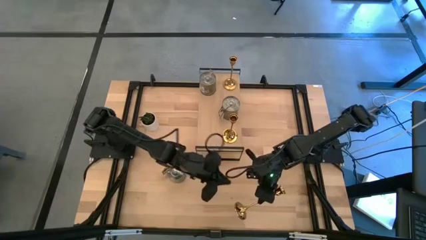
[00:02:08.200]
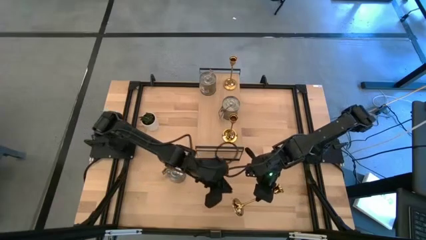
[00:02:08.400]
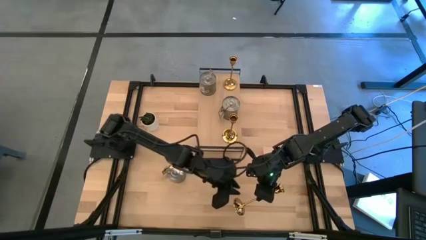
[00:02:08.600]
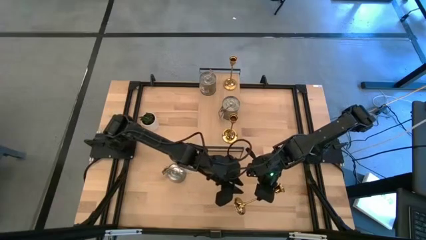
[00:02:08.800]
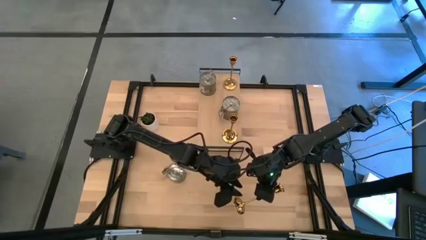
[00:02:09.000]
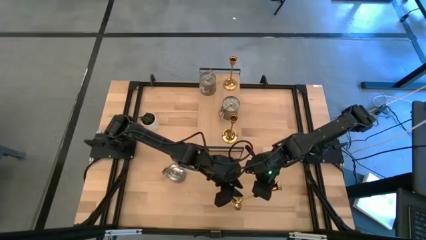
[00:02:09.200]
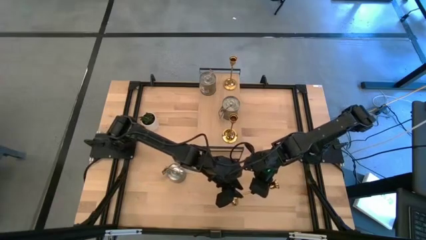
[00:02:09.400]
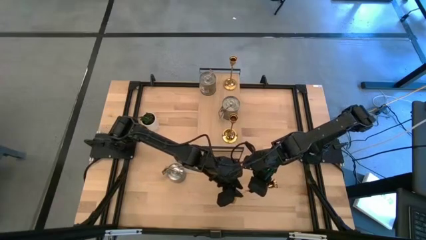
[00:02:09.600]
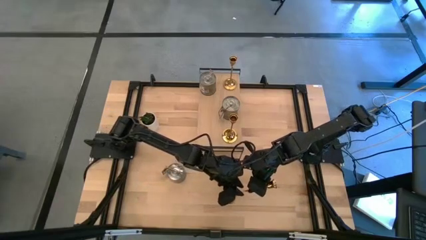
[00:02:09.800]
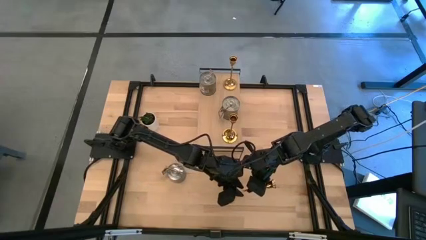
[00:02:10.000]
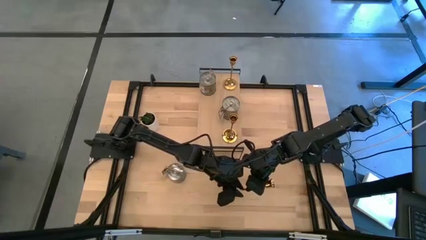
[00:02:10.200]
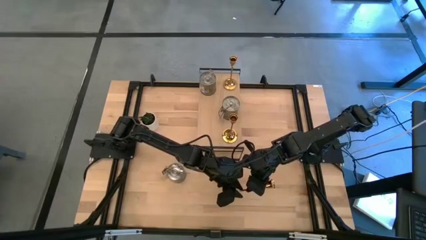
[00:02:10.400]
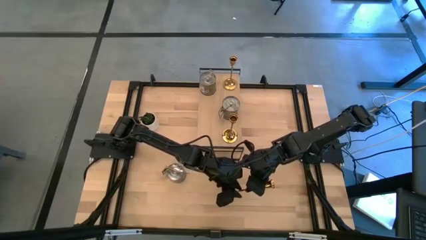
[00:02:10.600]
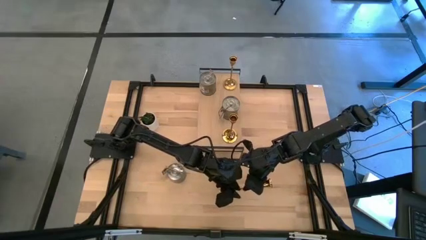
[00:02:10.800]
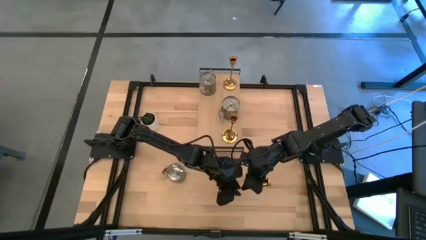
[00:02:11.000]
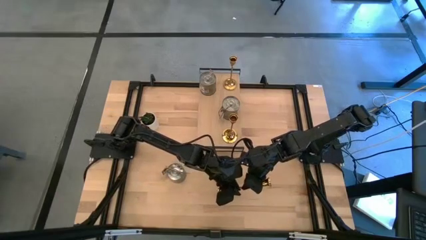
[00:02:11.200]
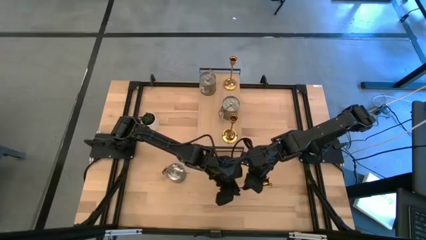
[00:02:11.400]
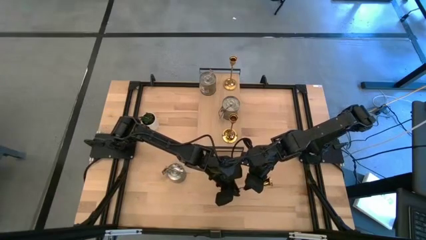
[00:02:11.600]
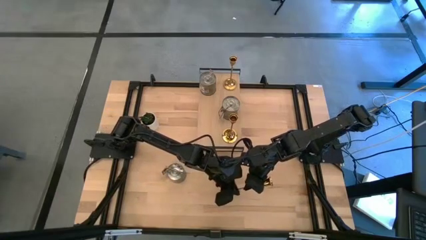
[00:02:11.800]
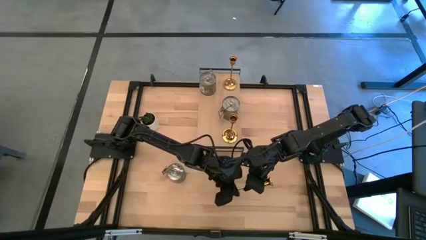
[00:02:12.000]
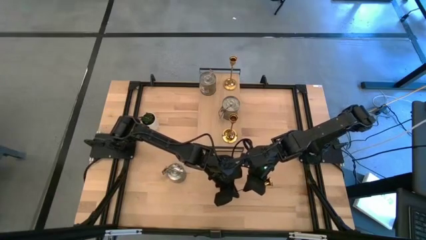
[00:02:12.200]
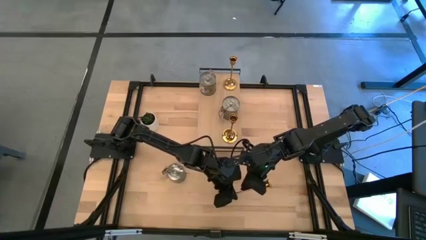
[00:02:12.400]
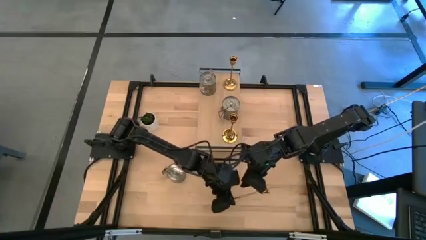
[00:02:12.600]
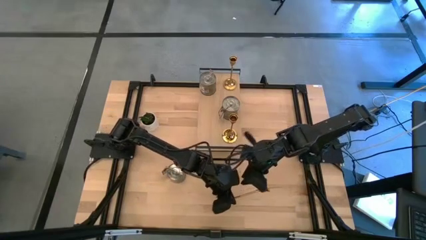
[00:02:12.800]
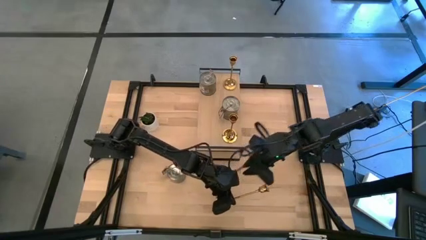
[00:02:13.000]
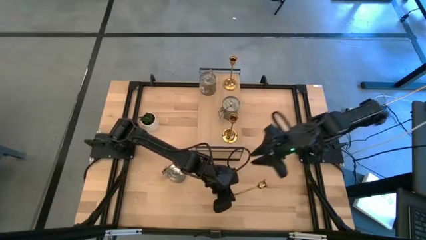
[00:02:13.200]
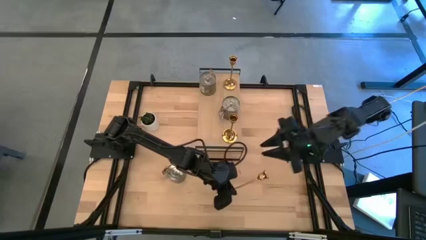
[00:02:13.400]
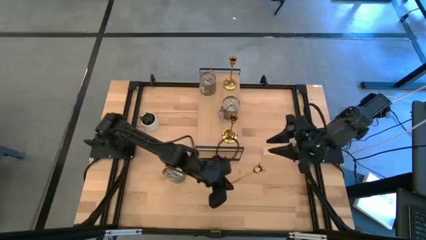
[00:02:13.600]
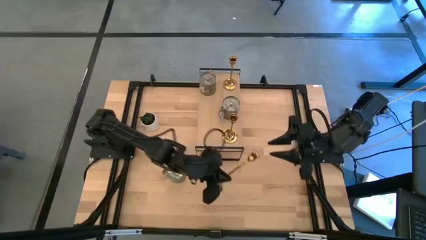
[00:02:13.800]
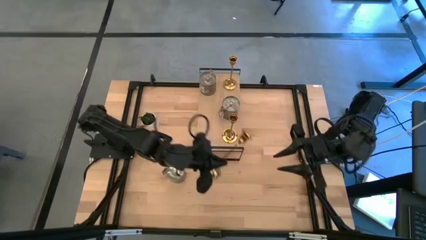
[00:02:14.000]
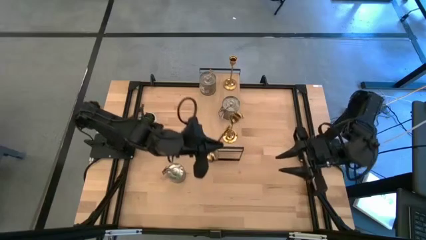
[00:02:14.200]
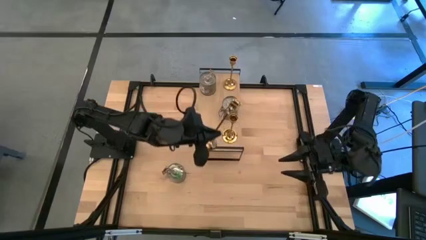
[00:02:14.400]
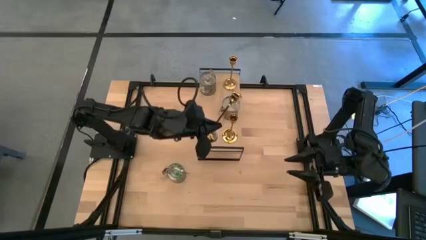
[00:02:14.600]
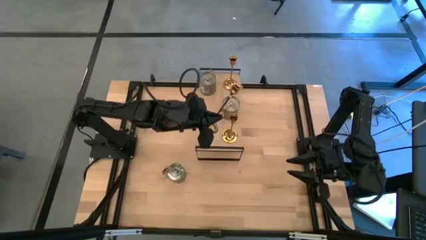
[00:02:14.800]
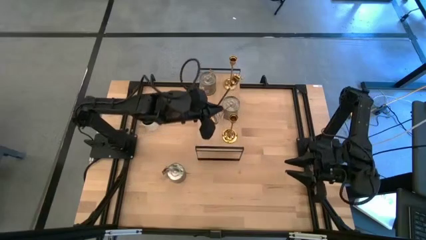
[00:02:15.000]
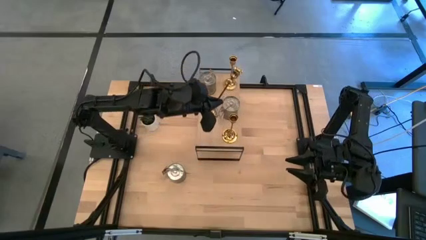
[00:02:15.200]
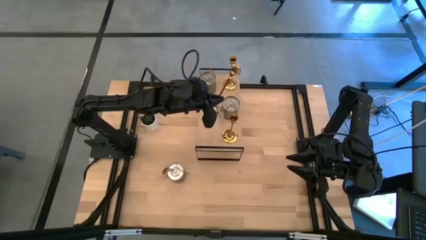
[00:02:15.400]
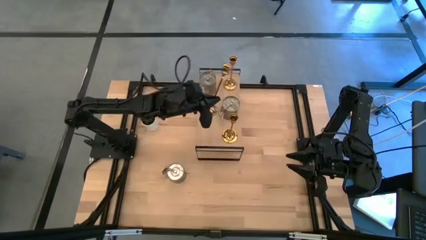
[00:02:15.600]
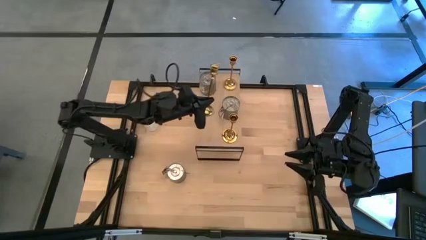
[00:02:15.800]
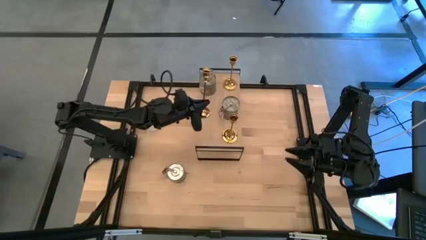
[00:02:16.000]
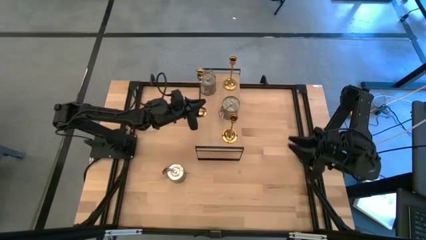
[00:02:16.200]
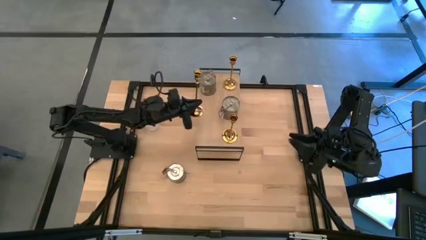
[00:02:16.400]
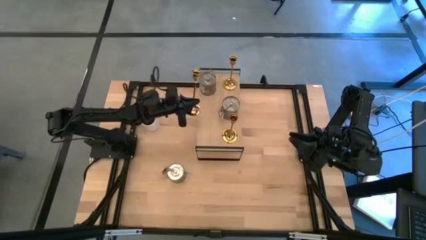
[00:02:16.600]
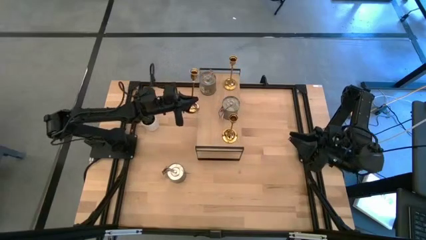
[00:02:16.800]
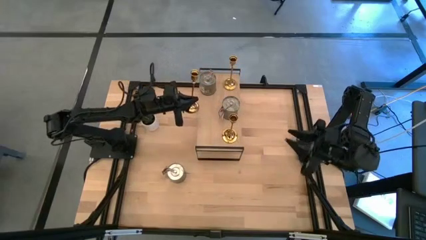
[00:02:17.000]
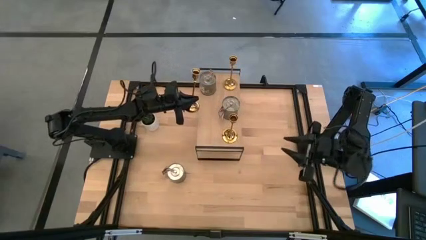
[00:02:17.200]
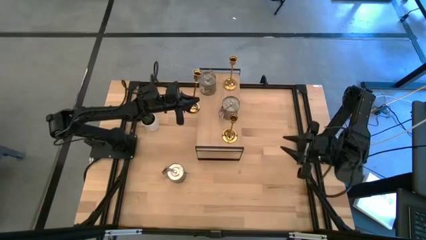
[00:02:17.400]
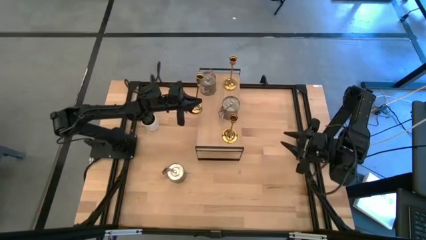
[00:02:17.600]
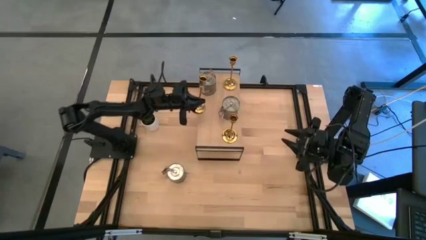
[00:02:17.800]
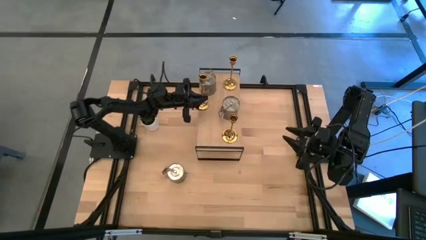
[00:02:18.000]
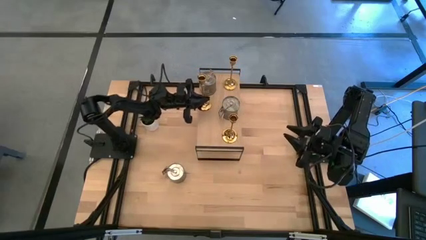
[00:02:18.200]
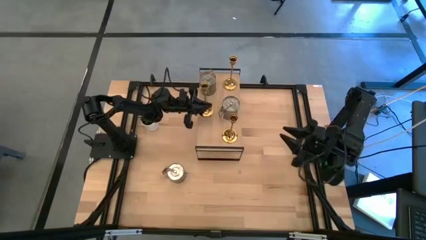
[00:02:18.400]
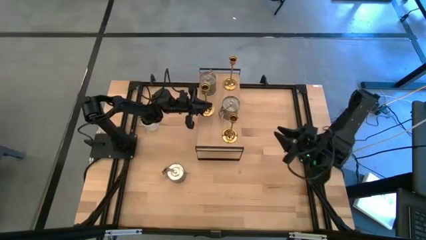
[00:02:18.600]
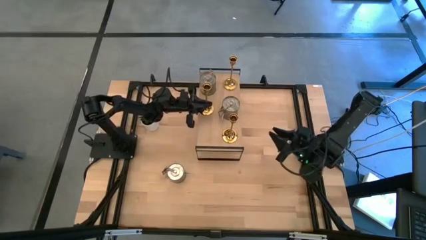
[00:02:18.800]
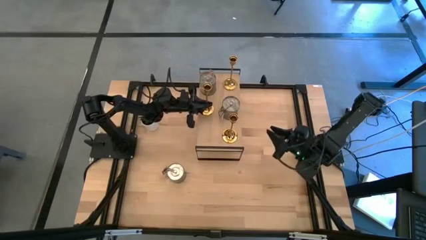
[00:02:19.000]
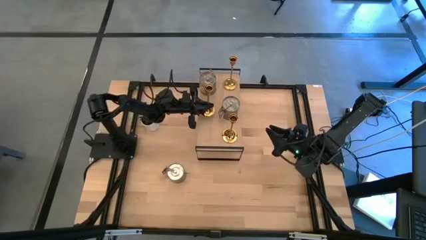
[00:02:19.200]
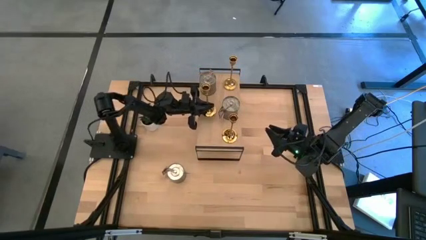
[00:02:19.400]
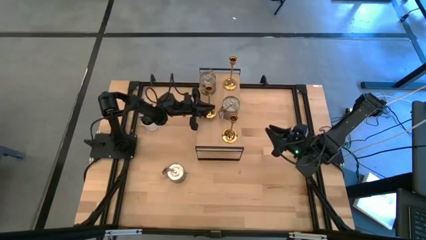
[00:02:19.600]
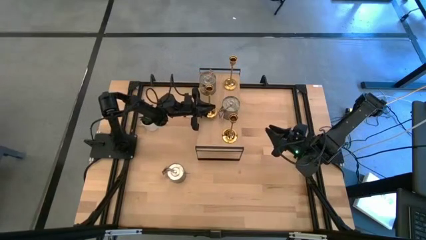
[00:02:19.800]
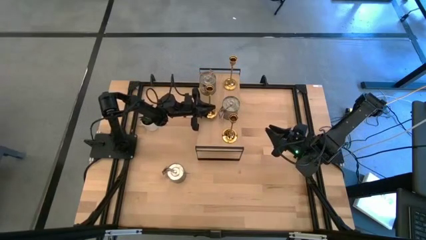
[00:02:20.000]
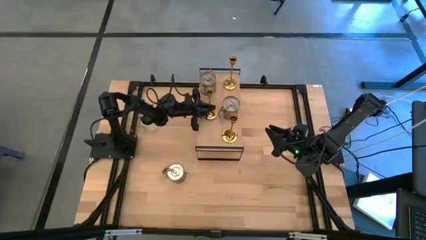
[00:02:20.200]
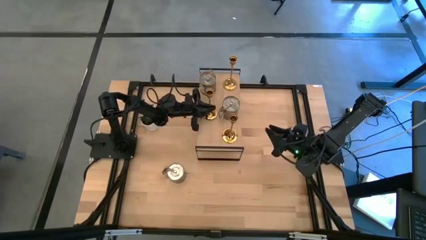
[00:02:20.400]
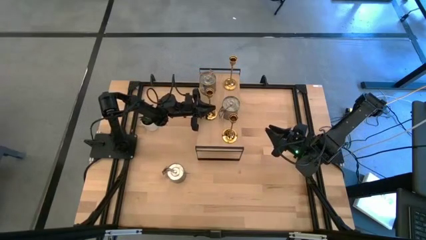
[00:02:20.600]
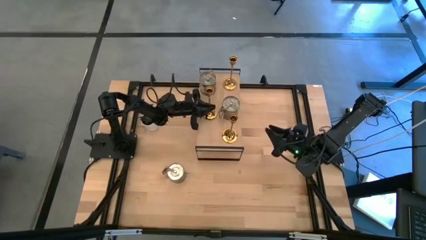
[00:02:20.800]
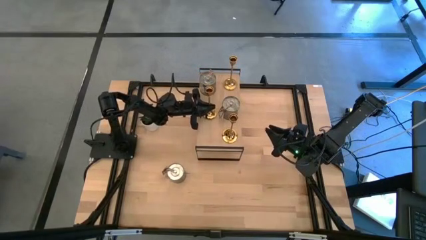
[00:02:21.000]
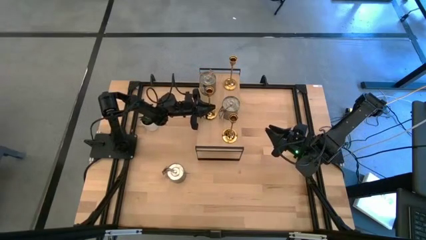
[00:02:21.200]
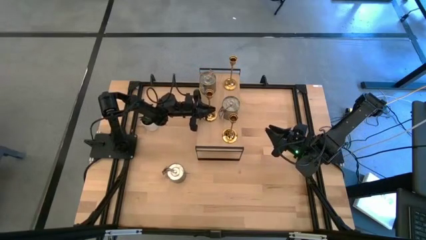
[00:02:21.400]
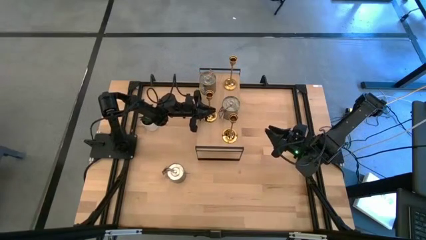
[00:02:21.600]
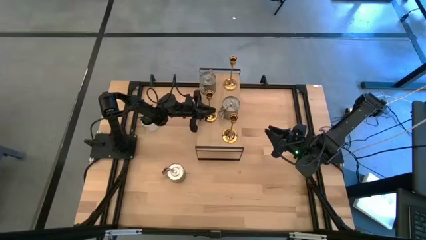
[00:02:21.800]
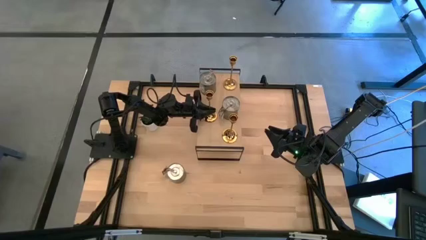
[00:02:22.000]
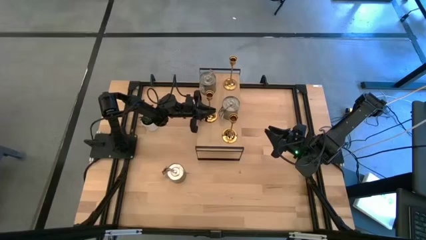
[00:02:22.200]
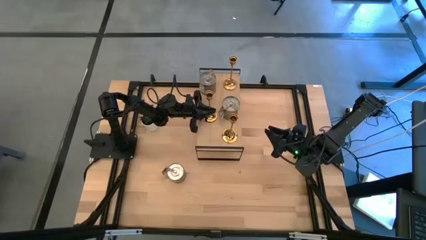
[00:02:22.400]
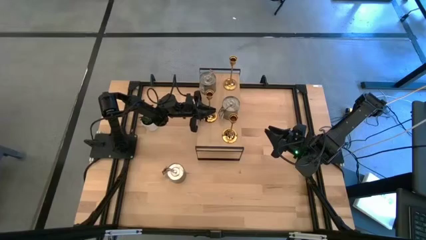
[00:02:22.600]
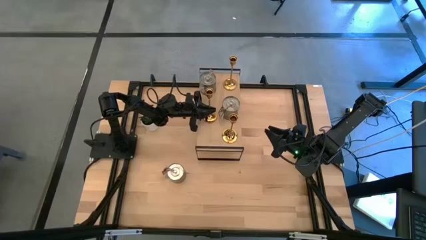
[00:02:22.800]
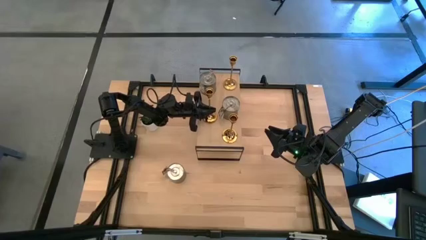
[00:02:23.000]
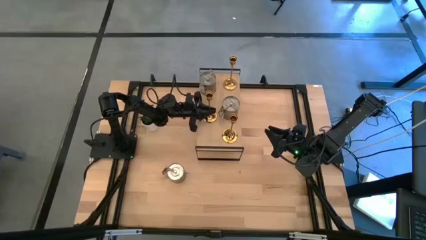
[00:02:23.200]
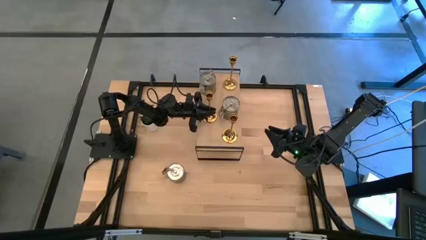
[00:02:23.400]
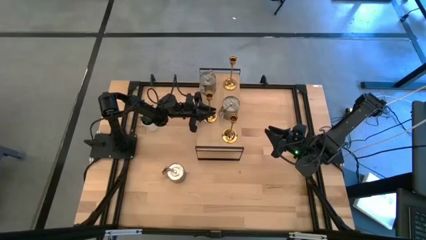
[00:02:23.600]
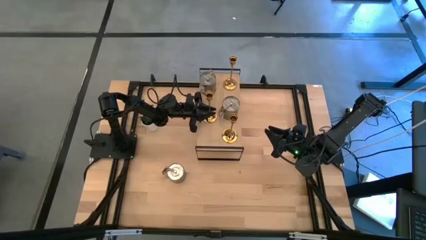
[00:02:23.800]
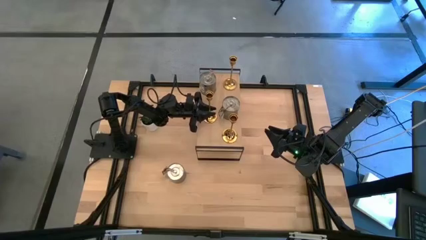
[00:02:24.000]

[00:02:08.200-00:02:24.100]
Task: Pick & Place candle stick holders
Put the gold candle holder on the shelf
